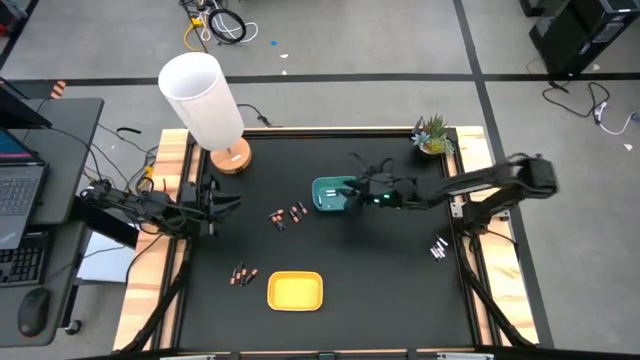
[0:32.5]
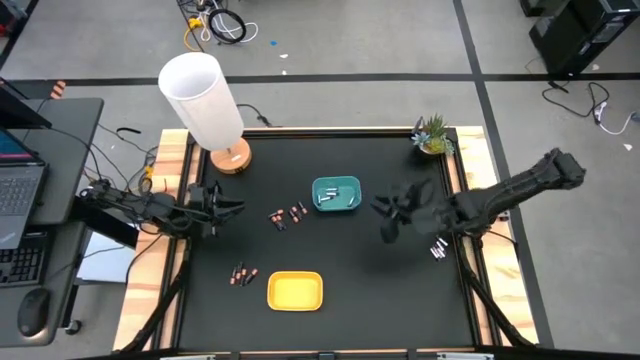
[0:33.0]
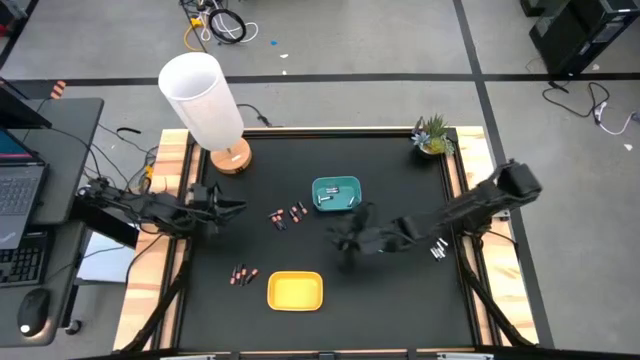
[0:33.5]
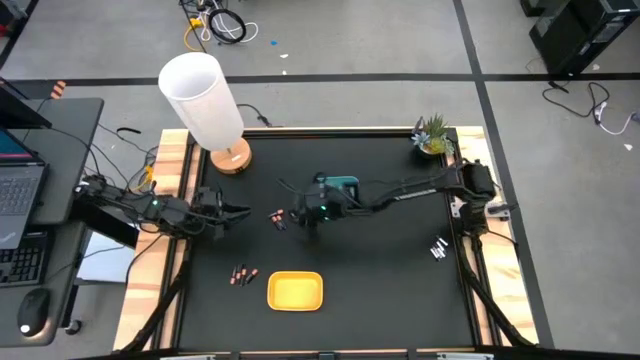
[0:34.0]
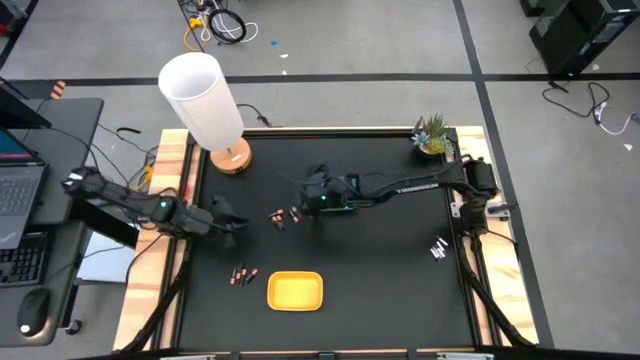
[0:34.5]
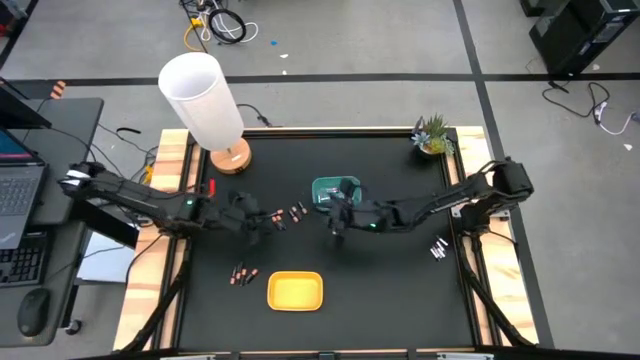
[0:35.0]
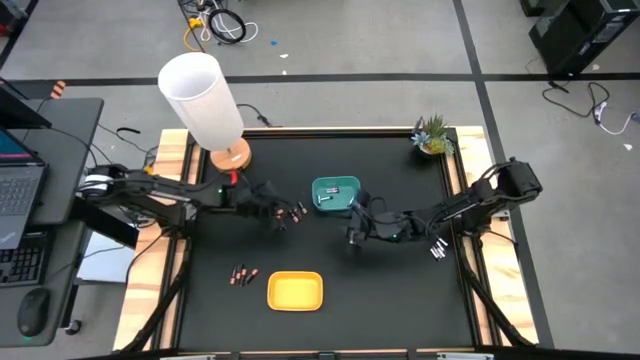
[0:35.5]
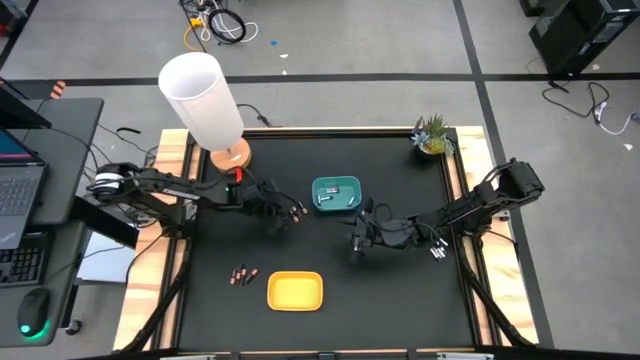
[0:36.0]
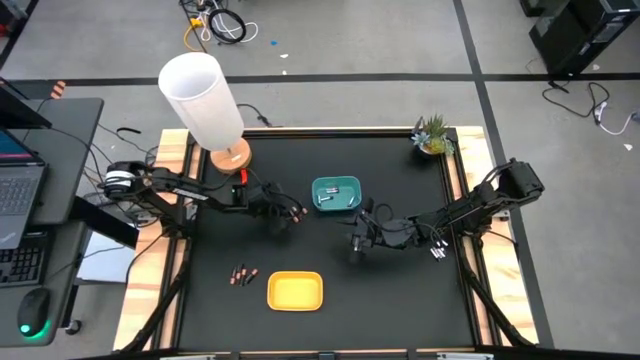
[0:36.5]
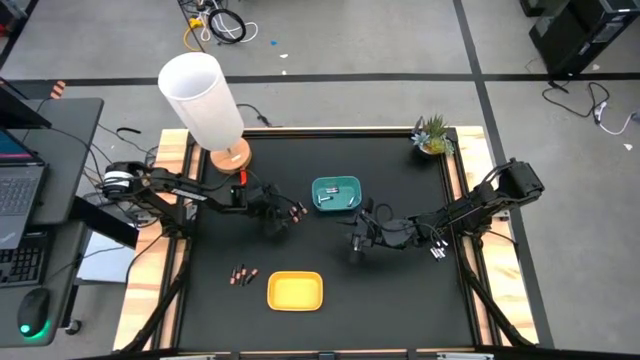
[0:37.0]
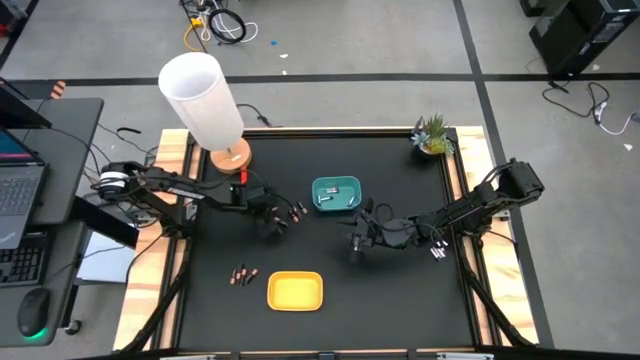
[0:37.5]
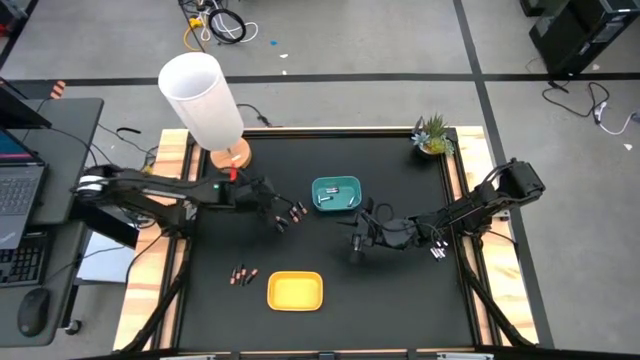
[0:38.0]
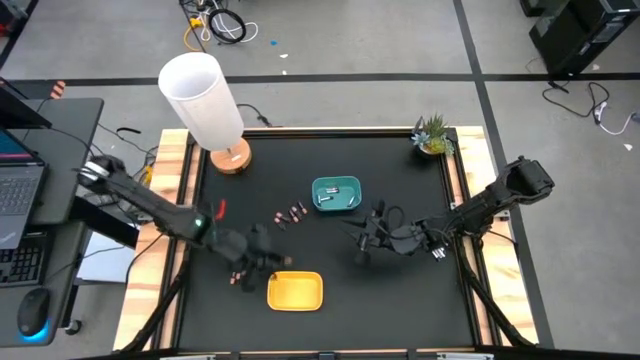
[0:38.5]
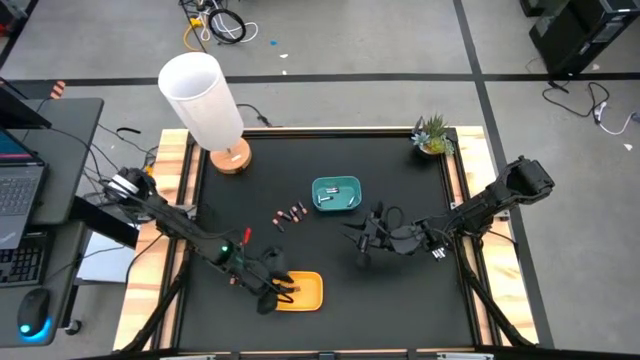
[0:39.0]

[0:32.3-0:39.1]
Task: Sort batteries
Put the black battery into the yellow bin

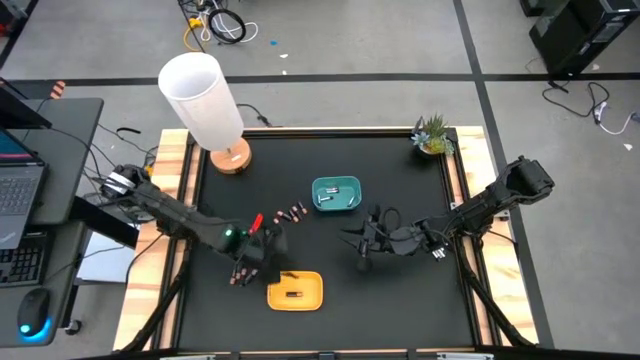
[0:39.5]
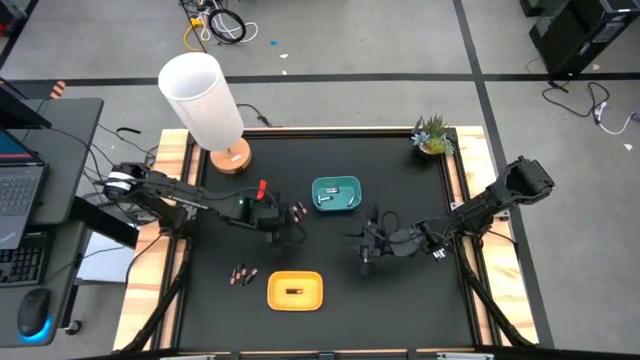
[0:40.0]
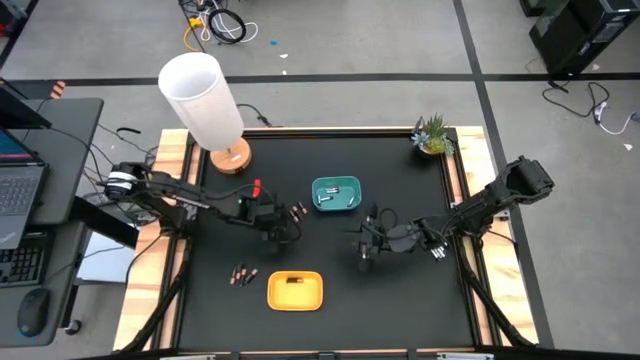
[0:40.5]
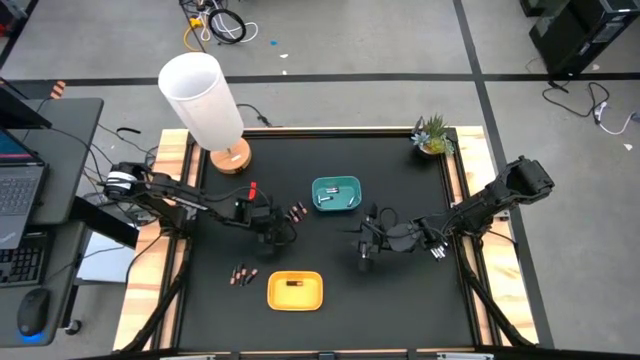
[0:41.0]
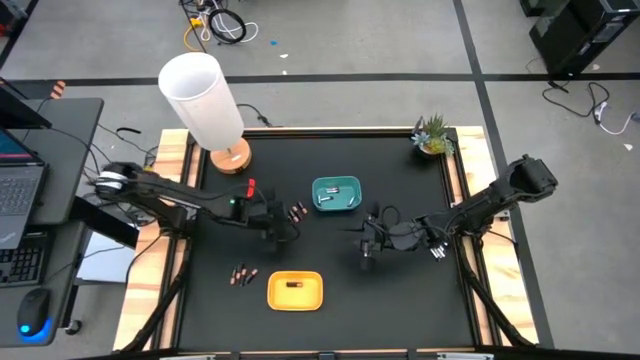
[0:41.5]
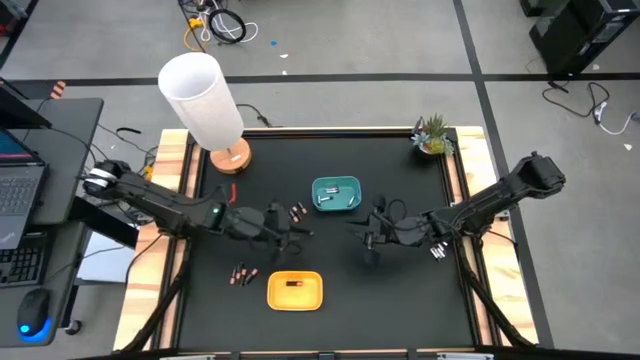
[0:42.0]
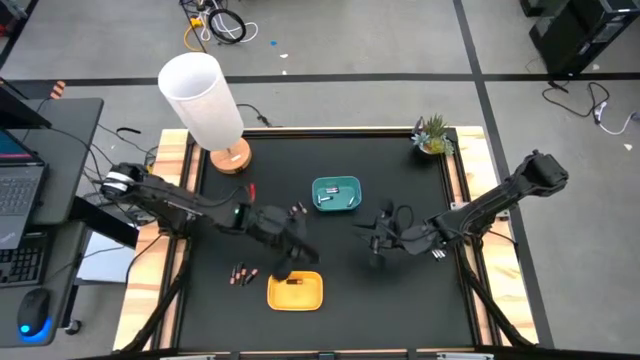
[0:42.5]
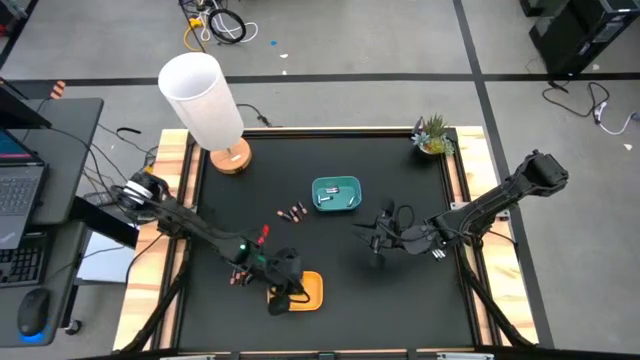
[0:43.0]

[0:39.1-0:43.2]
Put the black battery into the yellow bin

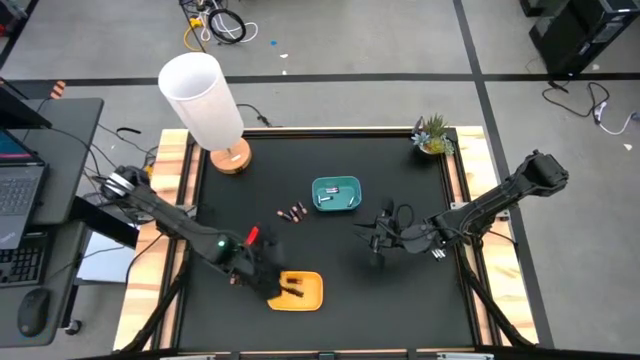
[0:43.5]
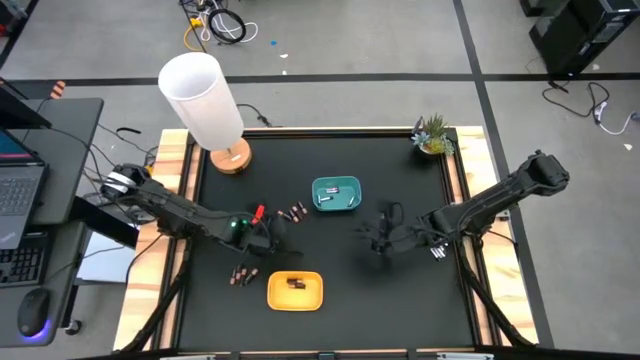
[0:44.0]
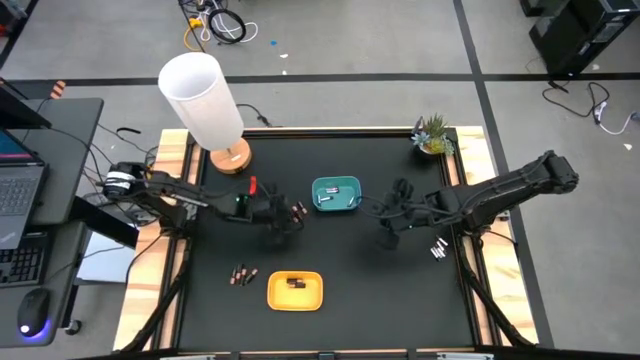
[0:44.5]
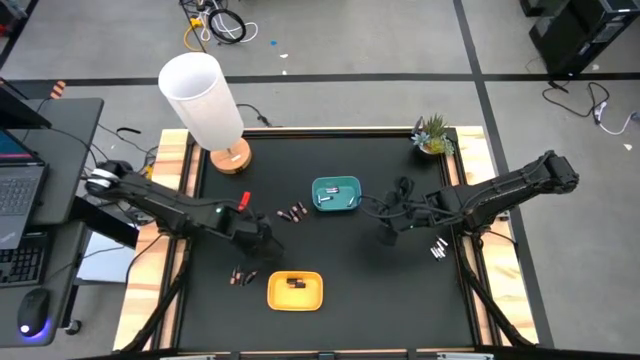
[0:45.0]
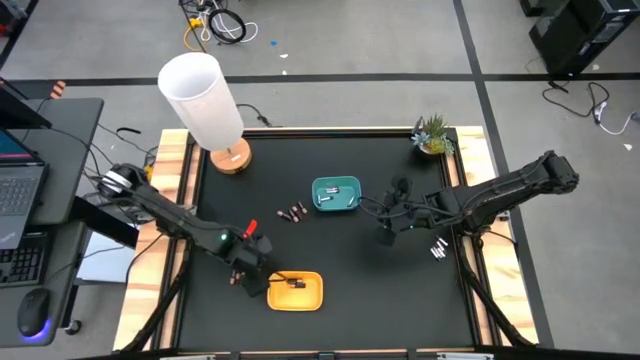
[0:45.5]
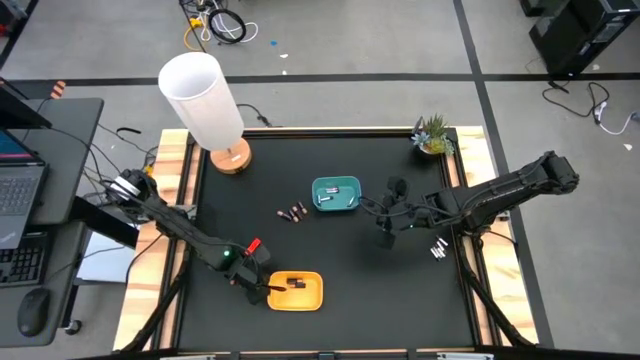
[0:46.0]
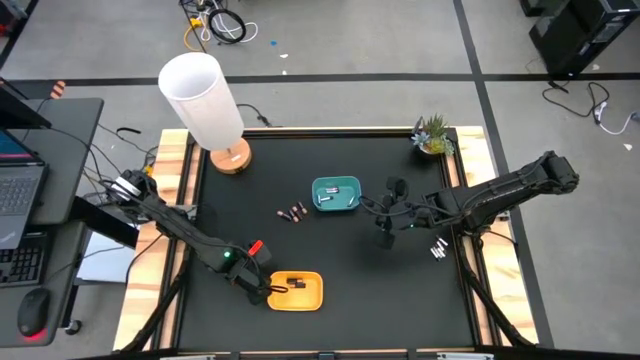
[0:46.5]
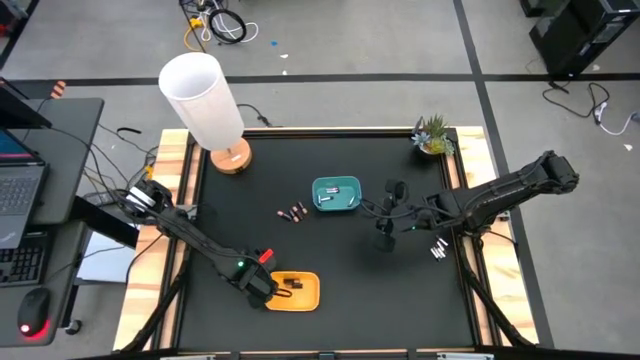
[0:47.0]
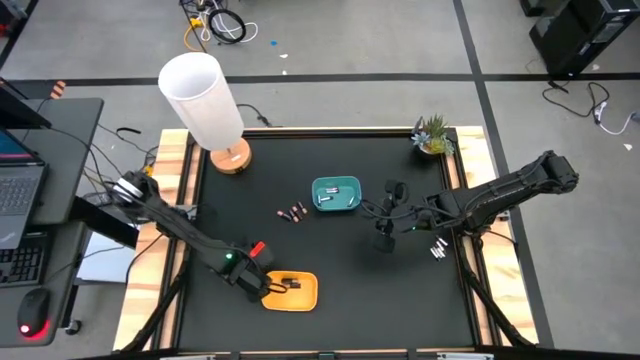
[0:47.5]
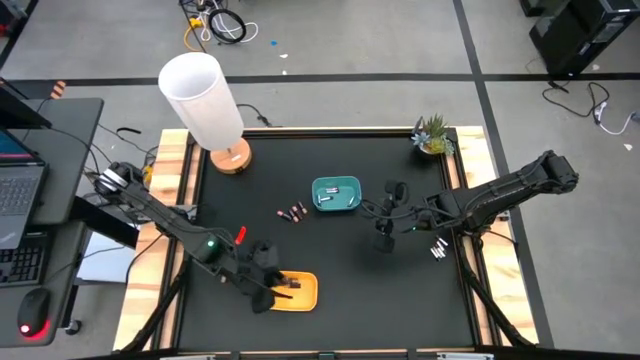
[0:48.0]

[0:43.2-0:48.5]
Put the black battery into the yellow bin

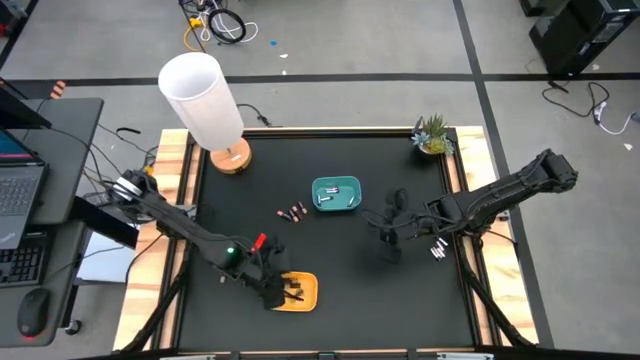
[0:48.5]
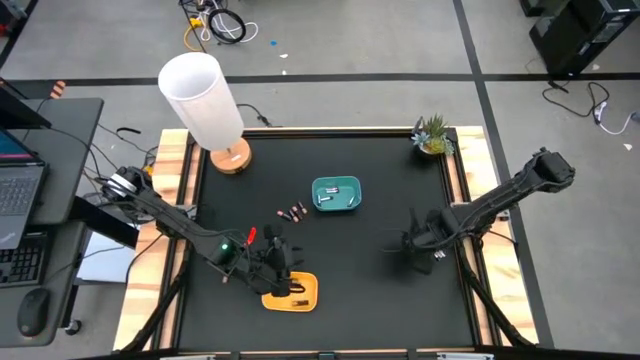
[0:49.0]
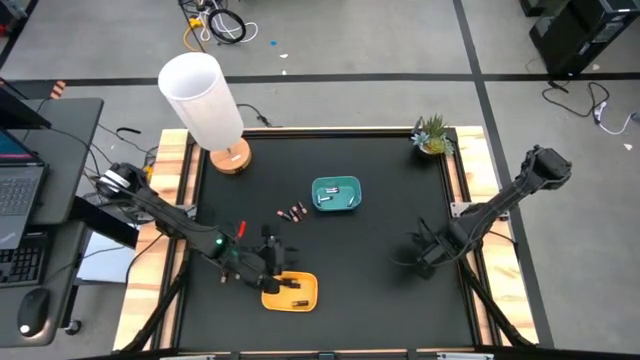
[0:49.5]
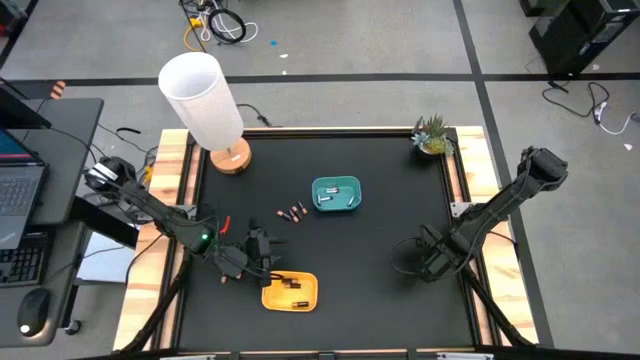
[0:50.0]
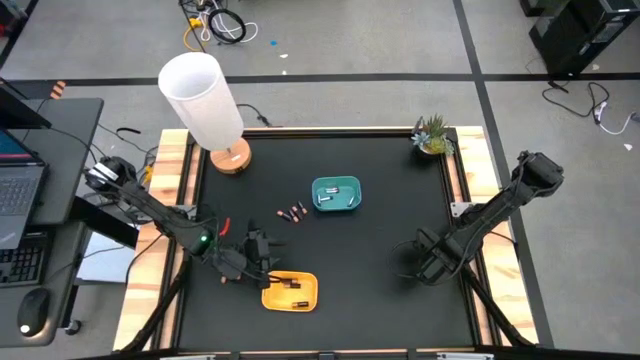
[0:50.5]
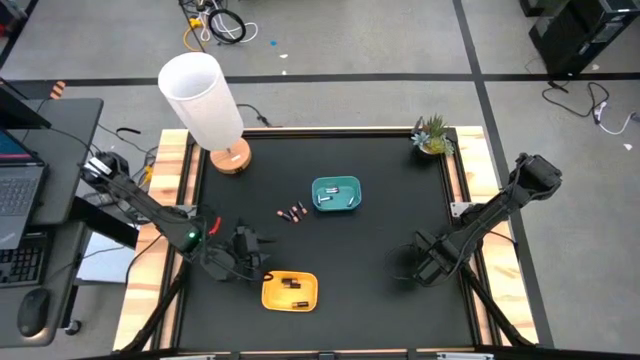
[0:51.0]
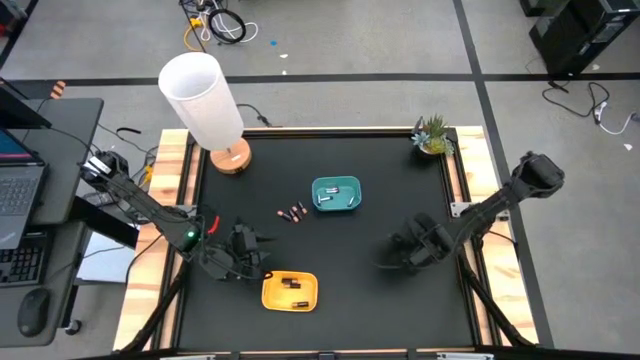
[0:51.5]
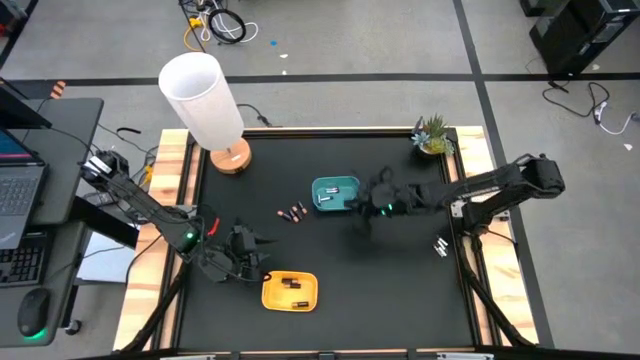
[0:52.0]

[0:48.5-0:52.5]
Put the silver battery into the blue bin

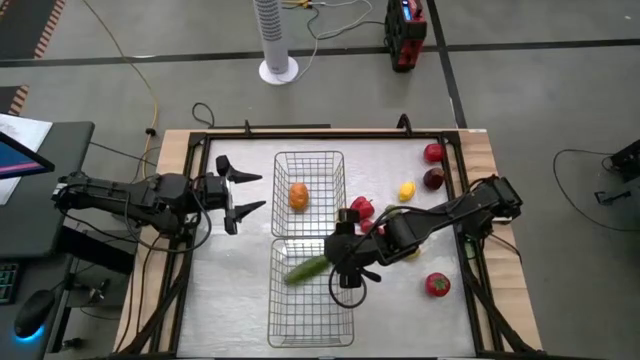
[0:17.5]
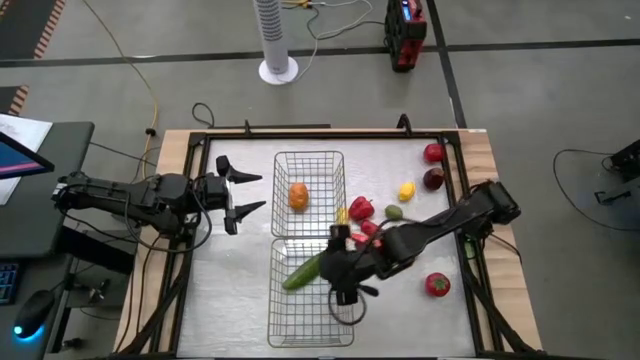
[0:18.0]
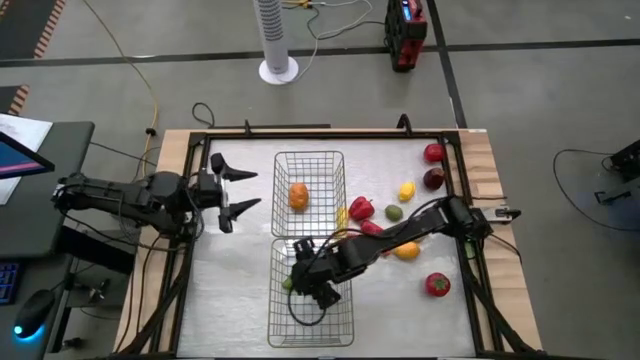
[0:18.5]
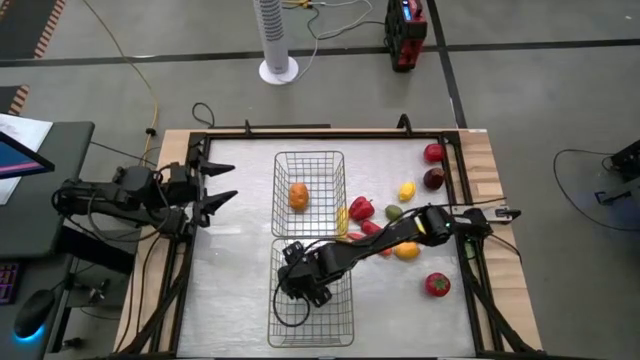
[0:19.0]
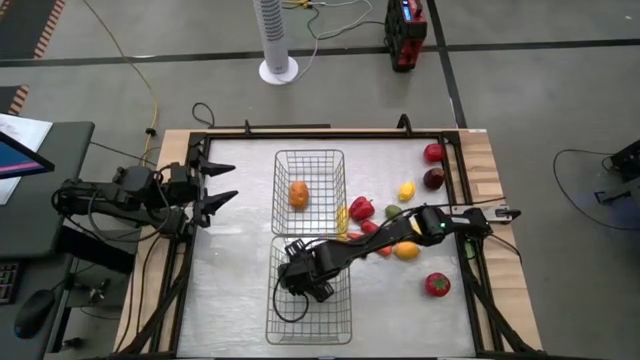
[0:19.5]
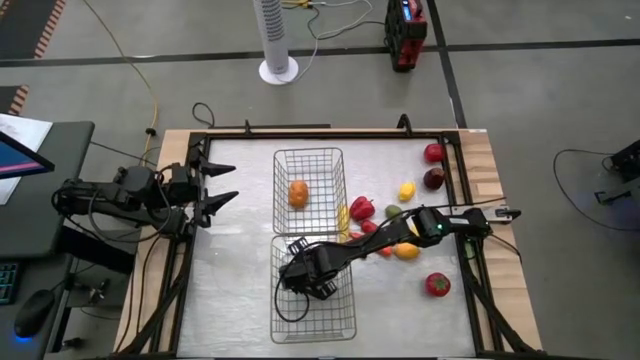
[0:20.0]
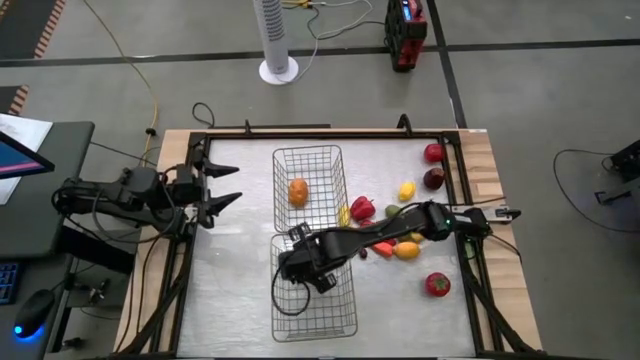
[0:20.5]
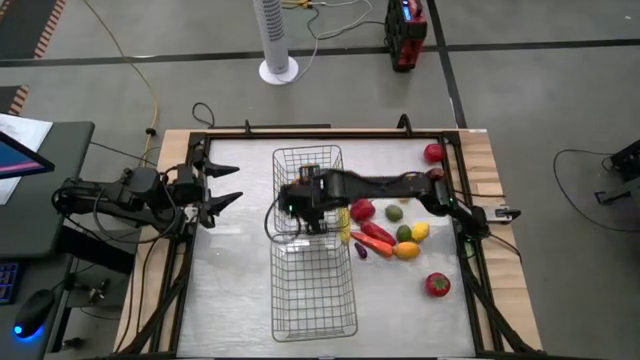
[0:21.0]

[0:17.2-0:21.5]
Task: Sort produce into baskets
Put the cucumber from the bottom wire basket into the top wire basket
